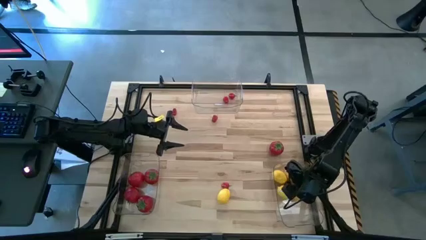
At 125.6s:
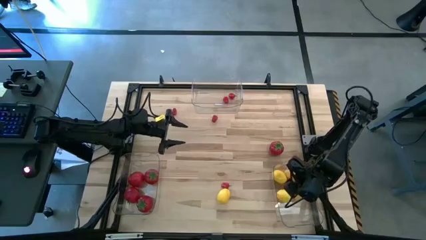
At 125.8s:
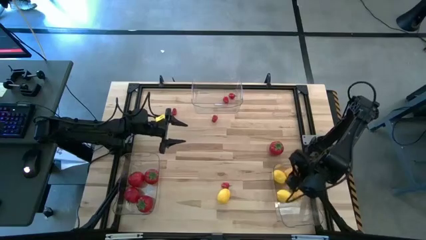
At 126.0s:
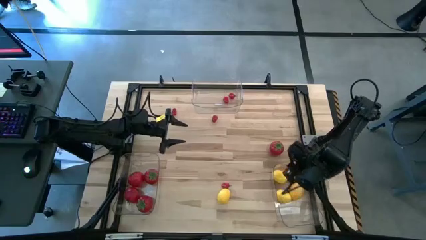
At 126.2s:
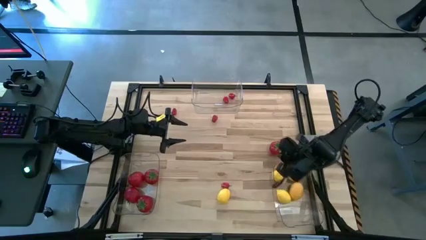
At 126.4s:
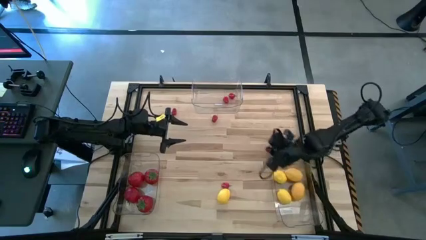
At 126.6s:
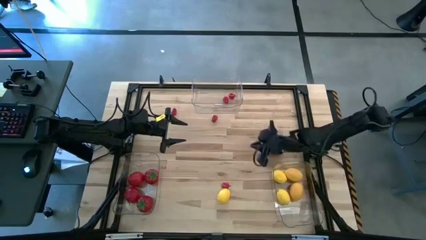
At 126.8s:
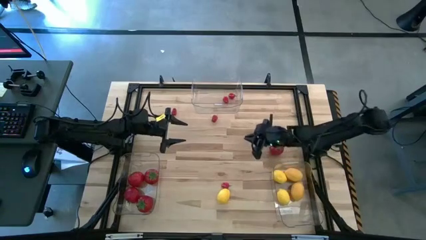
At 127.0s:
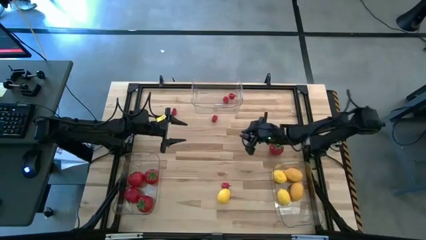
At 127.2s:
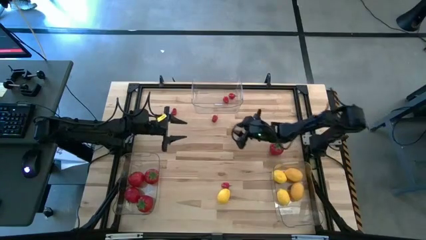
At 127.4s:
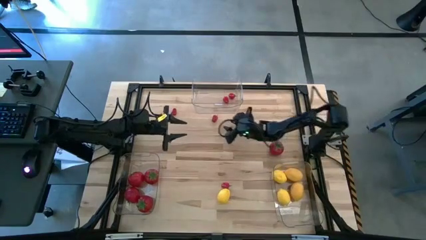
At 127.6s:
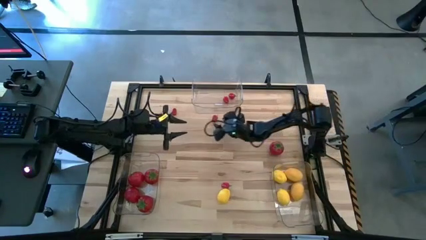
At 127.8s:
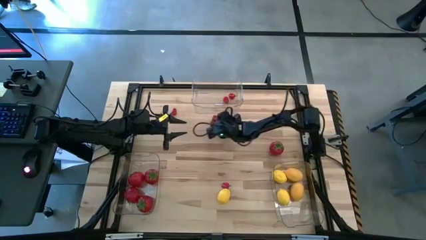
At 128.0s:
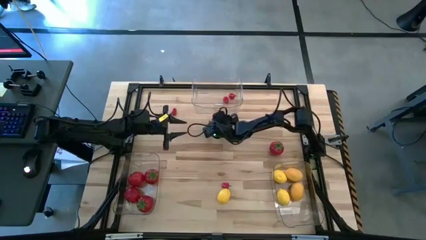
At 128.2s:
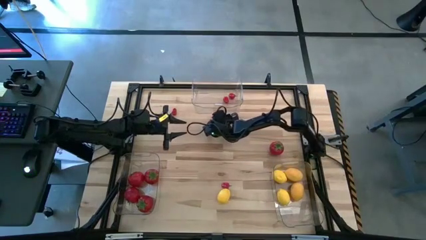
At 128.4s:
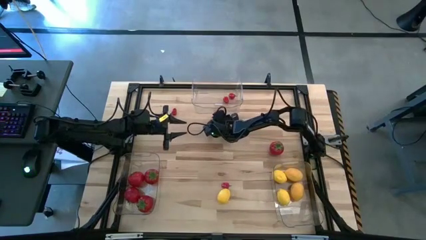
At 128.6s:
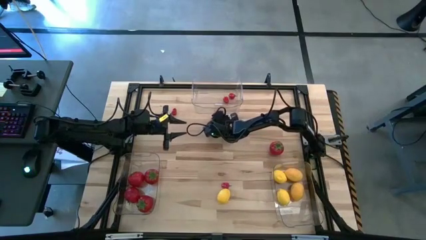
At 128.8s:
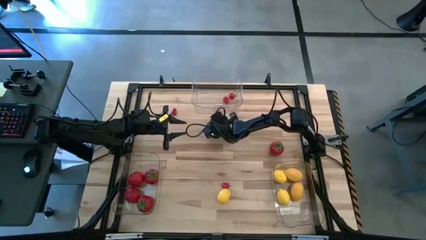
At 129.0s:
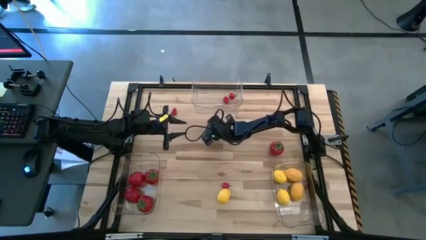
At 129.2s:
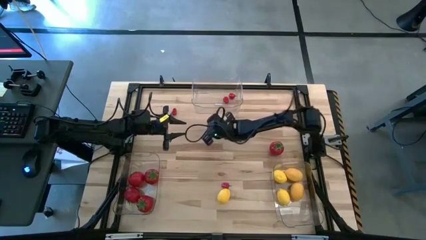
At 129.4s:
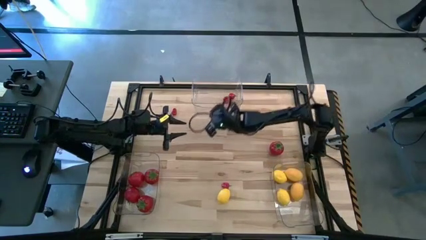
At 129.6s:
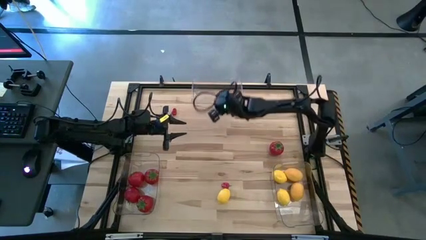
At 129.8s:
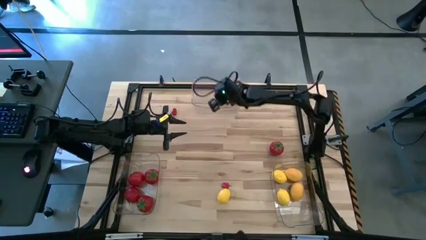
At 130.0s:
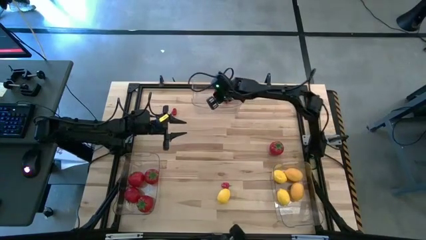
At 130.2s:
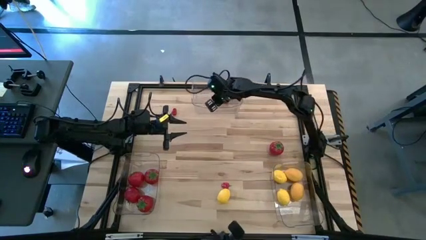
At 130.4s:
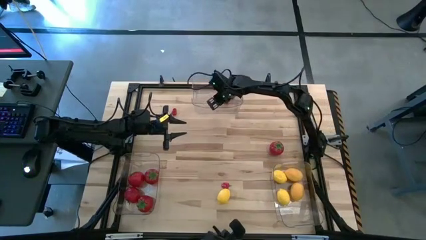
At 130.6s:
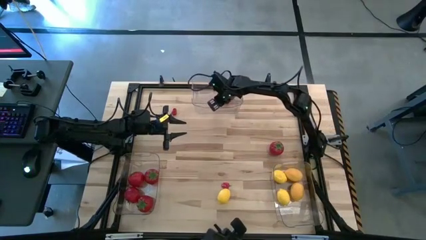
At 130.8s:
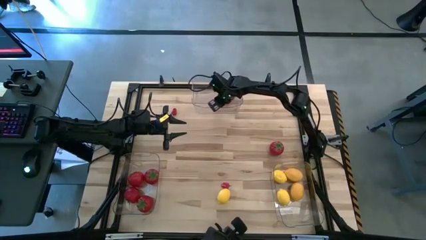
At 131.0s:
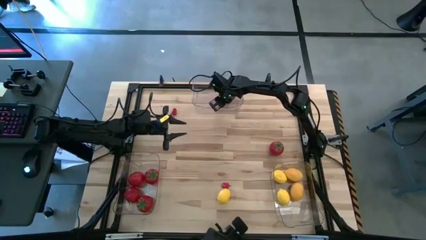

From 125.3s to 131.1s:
Task: Sort produce into baskets
Put the red chili pepper into the top center transparent bin

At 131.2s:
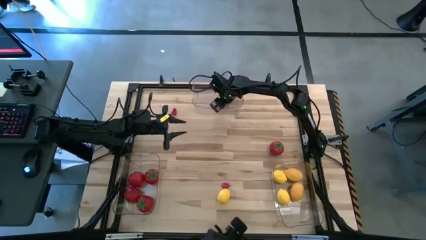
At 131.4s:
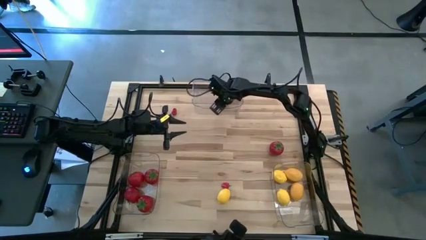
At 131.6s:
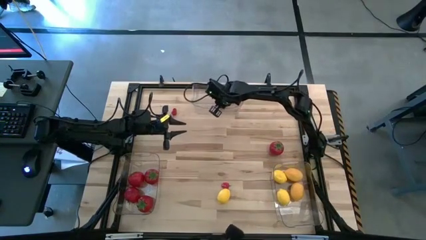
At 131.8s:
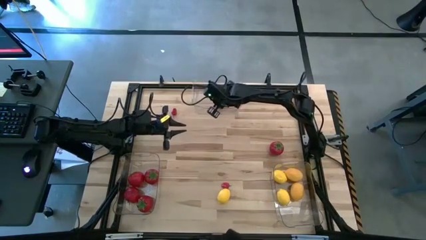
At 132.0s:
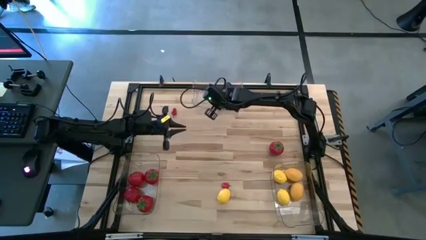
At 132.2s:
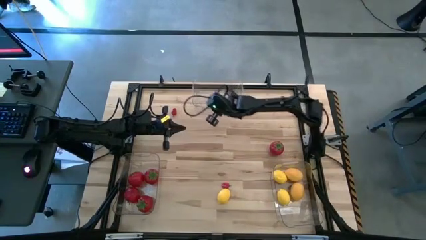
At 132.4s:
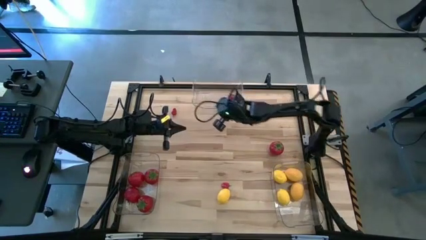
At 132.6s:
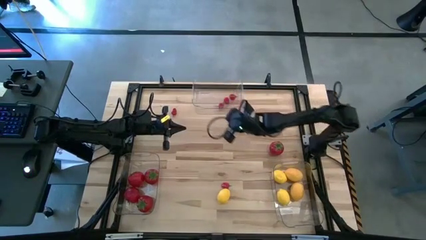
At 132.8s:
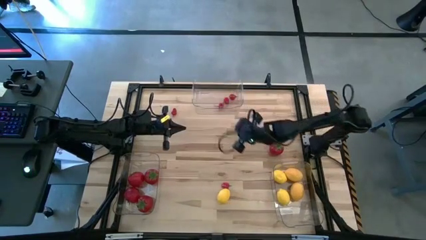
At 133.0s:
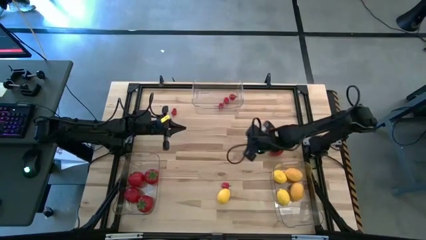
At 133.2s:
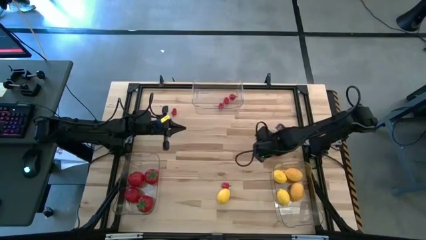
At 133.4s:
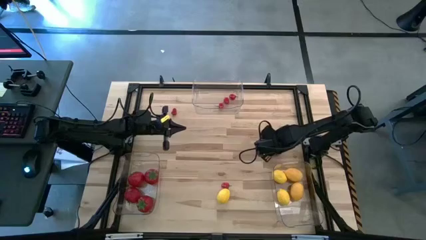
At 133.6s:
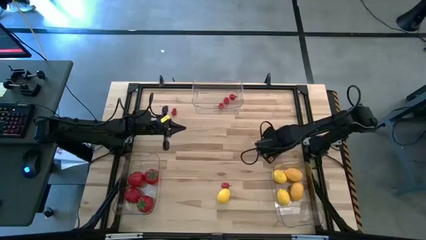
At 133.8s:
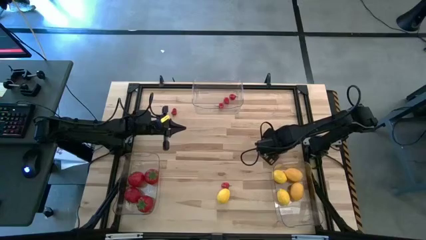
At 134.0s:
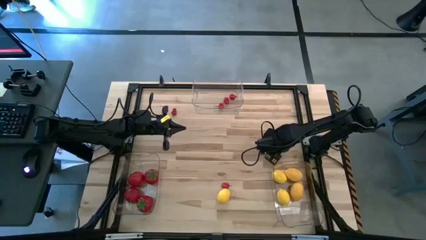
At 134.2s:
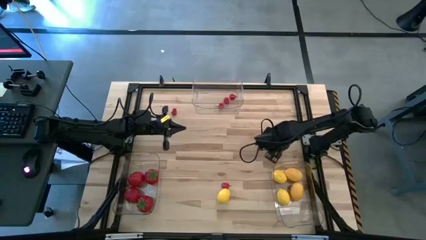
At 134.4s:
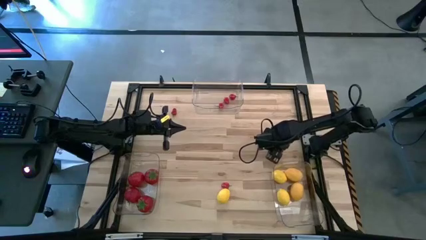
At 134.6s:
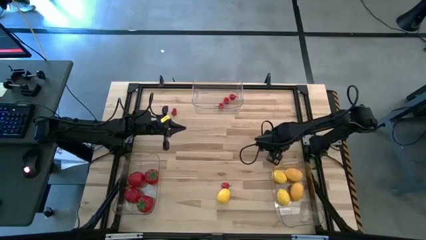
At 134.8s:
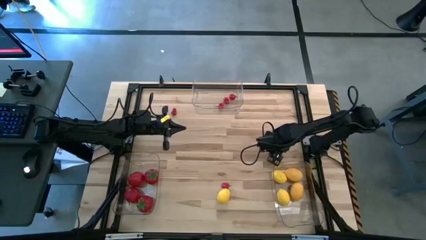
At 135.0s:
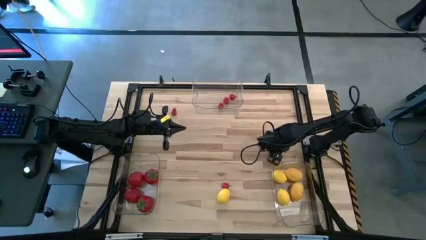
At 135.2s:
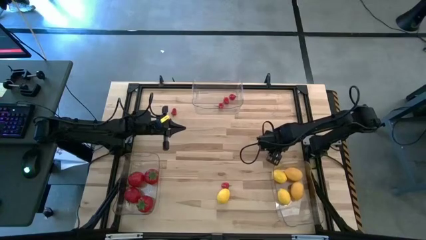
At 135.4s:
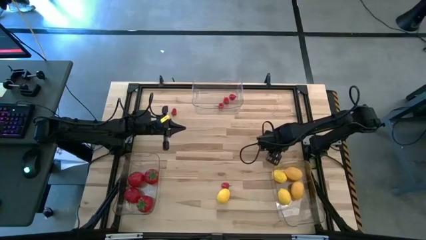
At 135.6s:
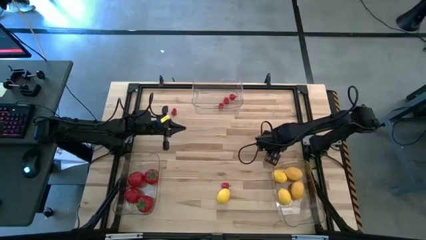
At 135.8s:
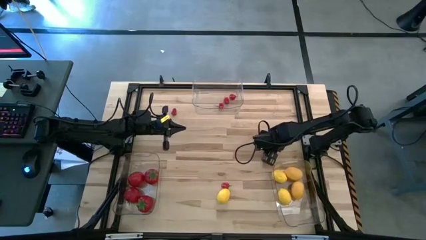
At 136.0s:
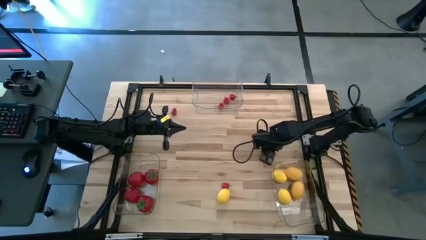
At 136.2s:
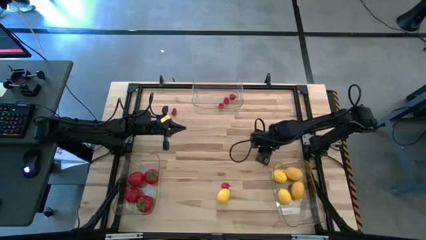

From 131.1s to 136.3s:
Put the red tomato into the bottom left transparent bin

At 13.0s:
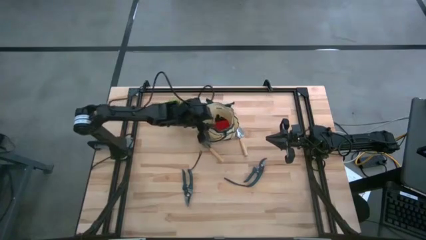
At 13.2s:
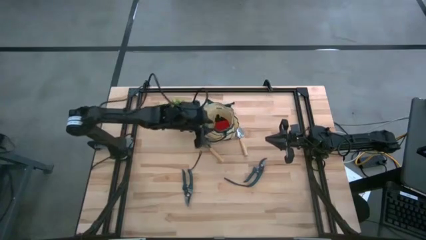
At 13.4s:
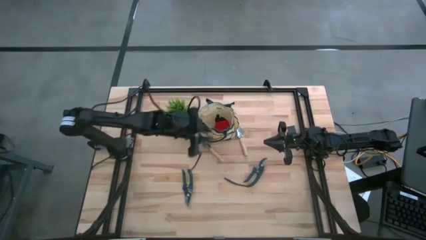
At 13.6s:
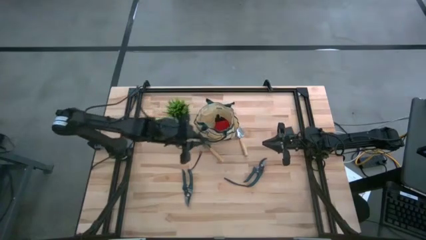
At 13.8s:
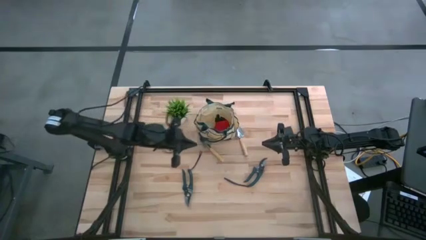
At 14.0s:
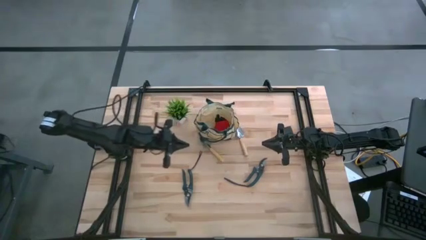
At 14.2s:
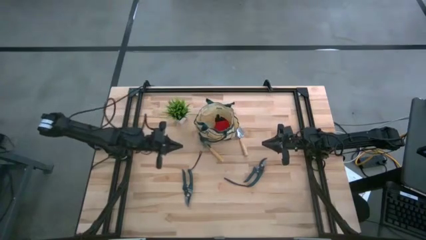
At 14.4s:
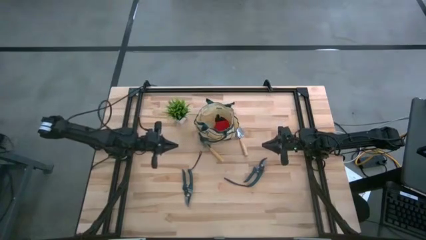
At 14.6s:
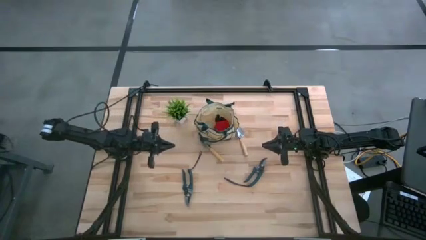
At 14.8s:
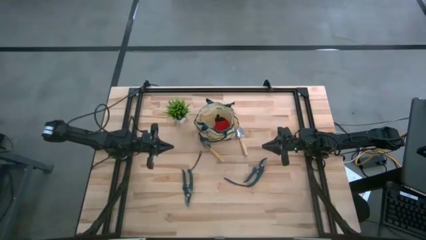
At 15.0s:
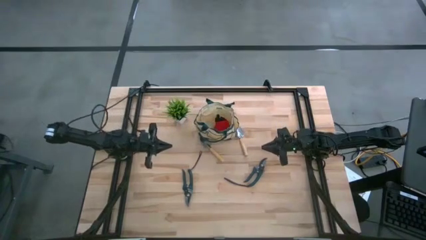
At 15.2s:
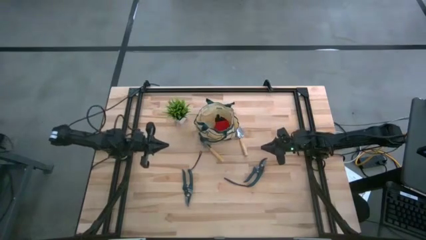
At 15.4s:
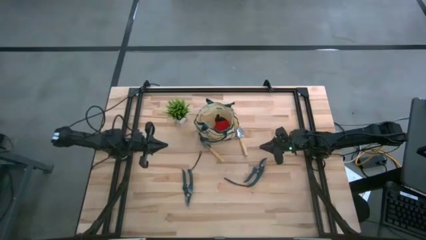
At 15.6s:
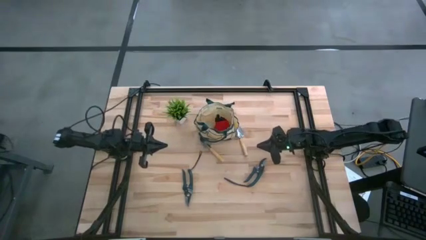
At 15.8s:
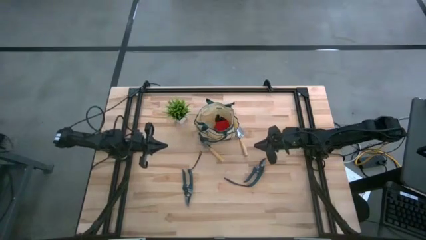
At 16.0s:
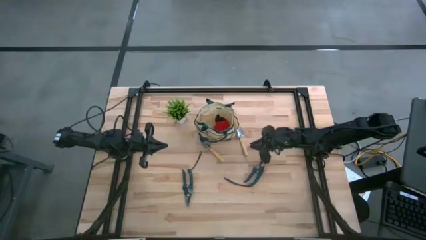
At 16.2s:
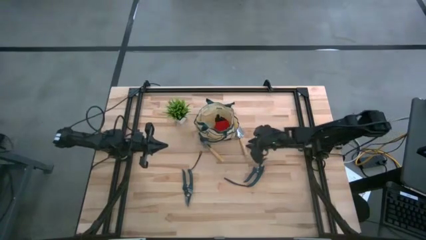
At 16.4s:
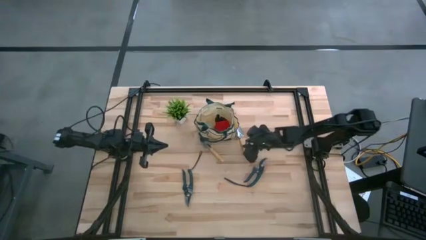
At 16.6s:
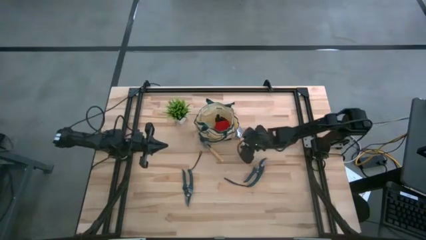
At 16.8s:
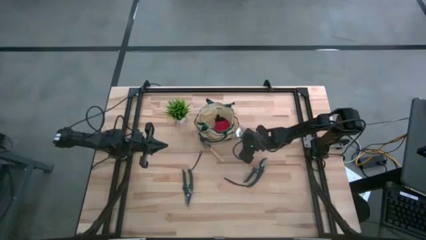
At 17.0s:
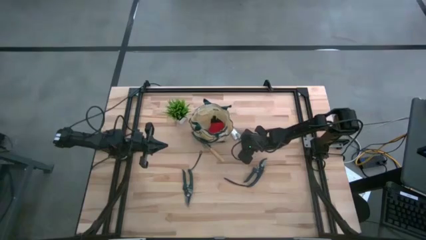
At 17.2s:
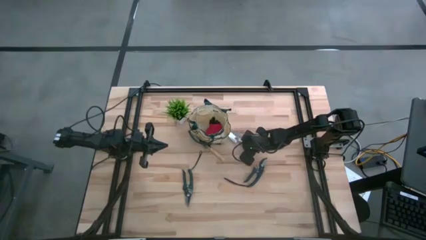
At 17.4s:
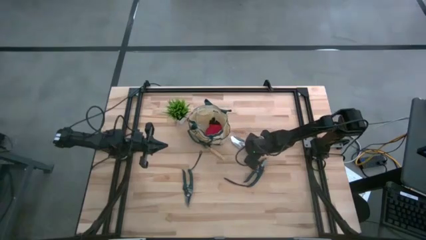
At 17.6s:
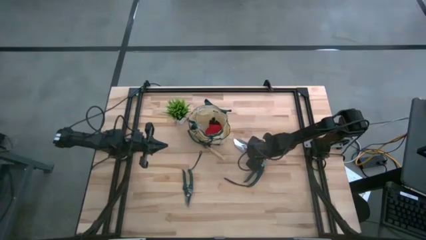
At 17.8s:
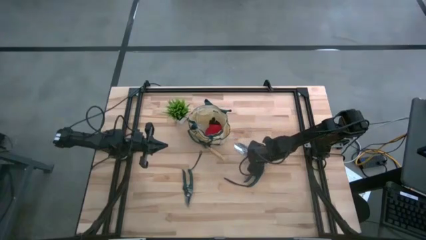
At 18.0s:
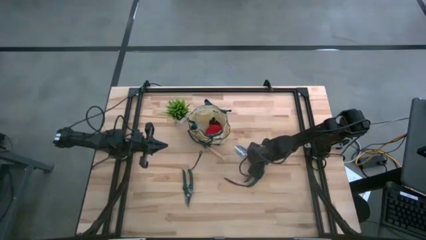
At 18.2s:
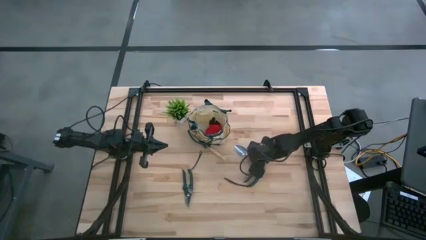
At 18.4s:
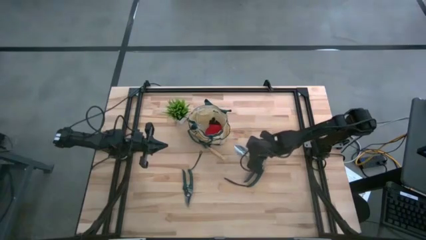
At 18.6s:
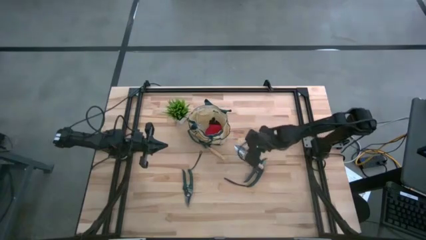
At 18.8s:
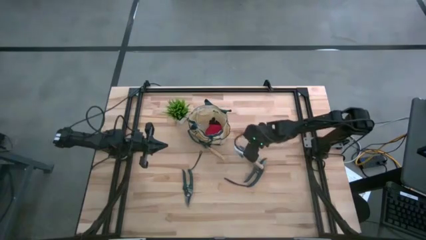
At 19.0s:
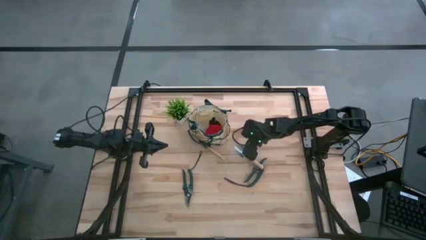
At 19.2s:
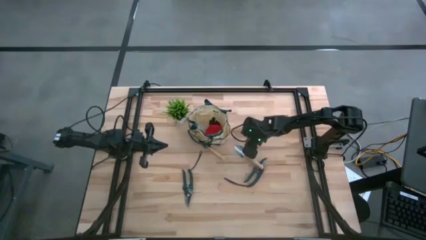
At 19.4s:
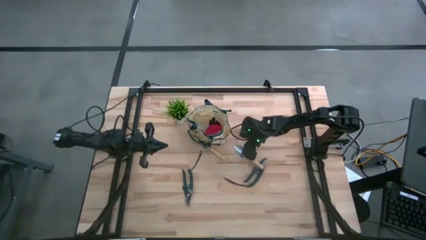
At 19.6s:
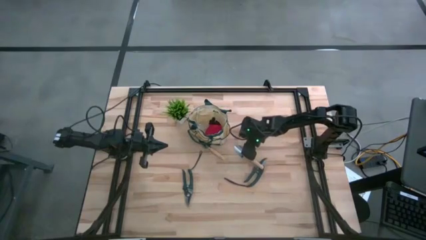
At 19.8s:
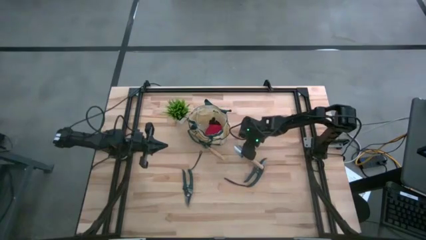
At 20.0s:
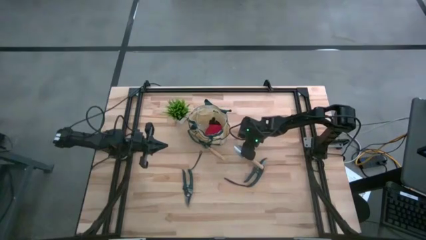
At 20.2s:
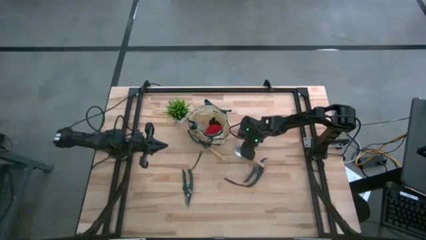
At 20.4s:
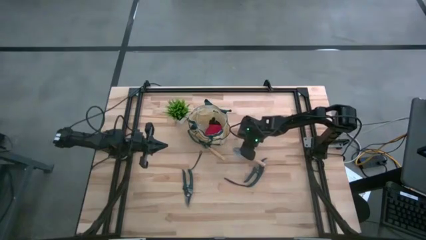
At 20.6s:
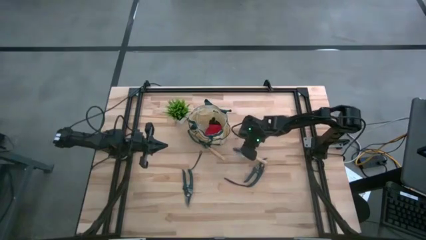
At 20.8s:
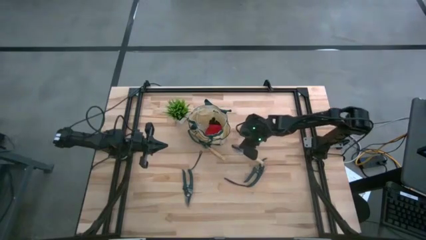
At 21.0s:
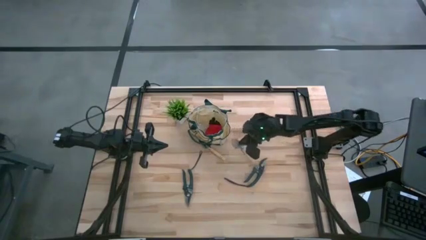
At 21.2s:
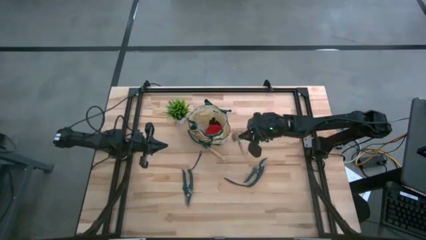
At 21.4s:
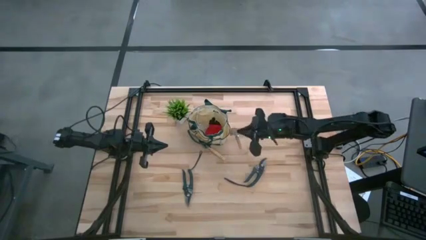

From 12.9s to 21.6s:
Task: Pick & Place Garden tools in Gardening bag
Put the right brown trowel into the white gardening bag
